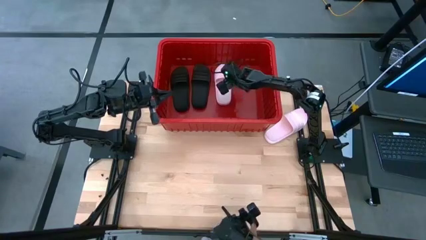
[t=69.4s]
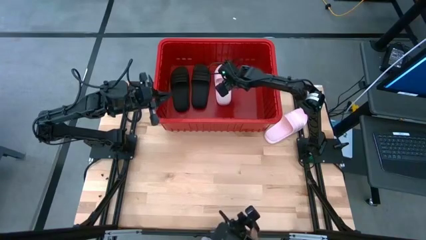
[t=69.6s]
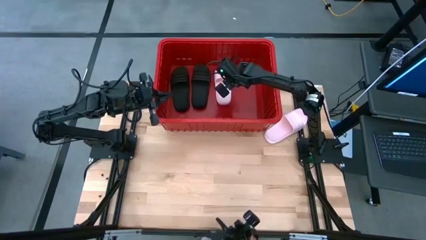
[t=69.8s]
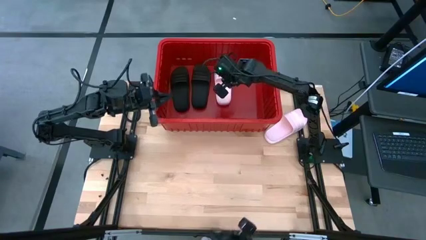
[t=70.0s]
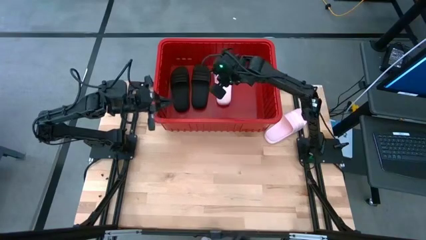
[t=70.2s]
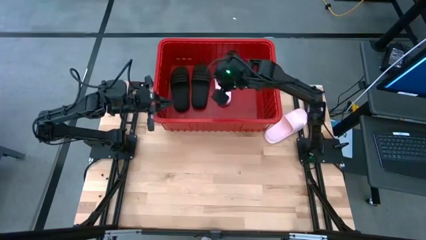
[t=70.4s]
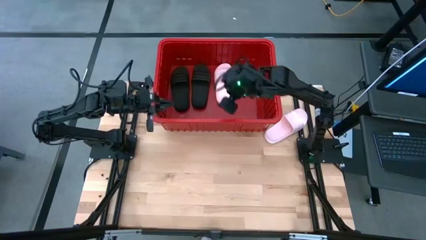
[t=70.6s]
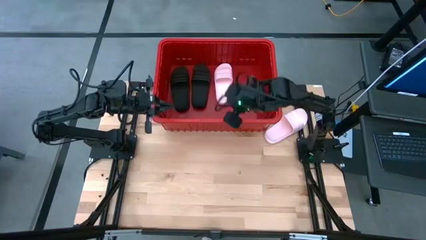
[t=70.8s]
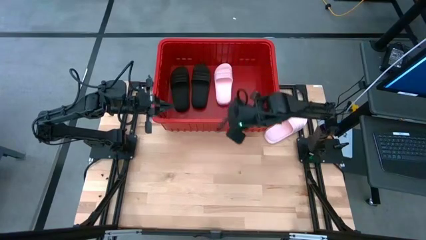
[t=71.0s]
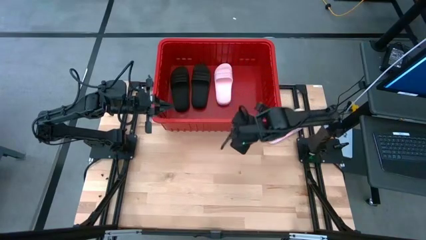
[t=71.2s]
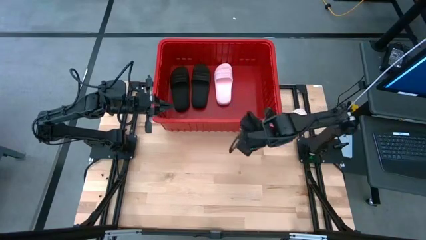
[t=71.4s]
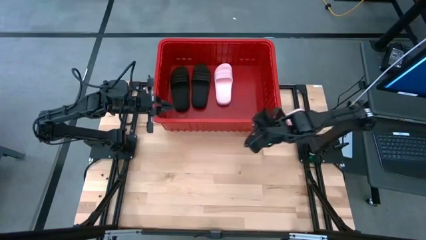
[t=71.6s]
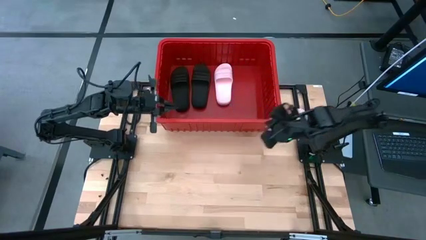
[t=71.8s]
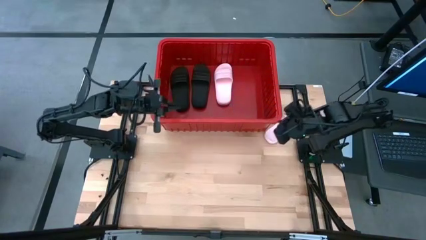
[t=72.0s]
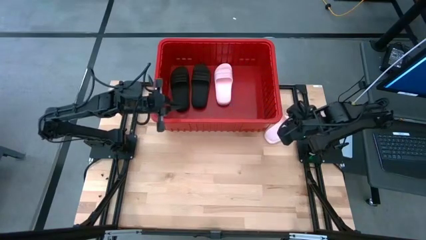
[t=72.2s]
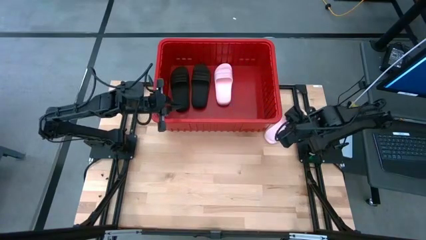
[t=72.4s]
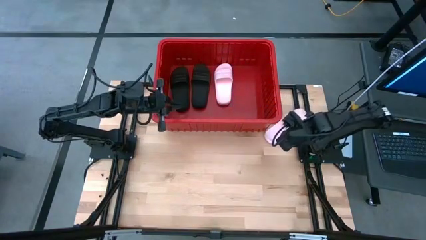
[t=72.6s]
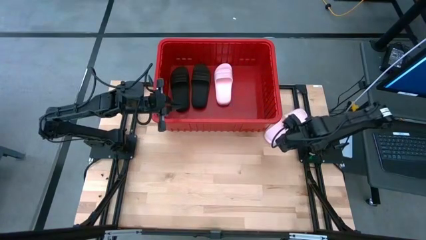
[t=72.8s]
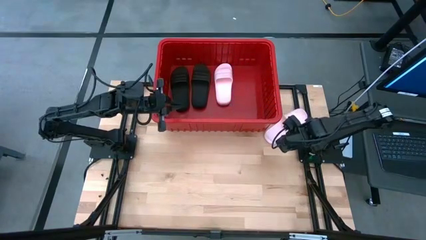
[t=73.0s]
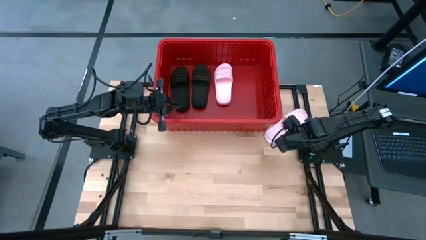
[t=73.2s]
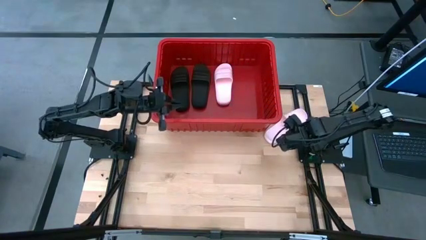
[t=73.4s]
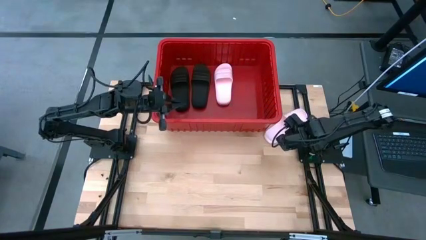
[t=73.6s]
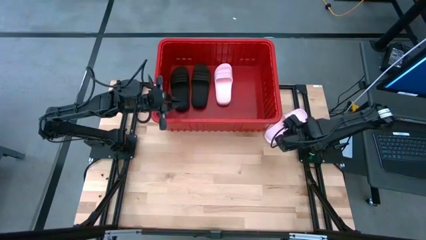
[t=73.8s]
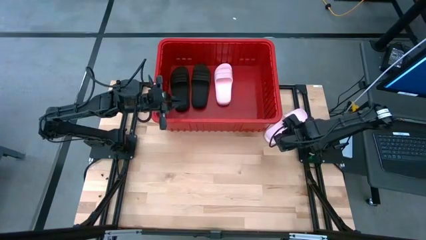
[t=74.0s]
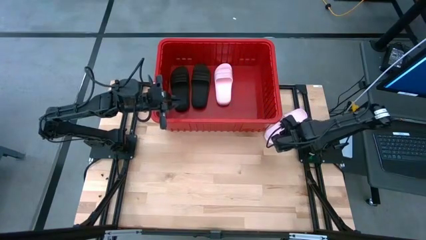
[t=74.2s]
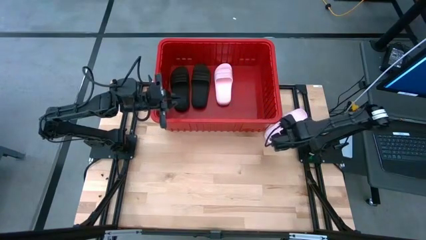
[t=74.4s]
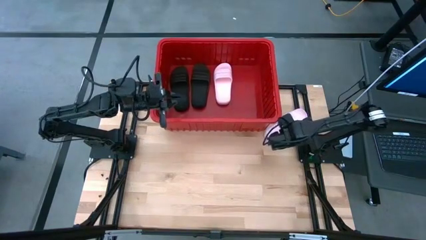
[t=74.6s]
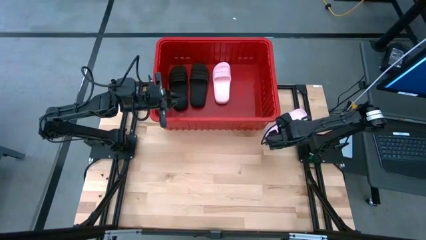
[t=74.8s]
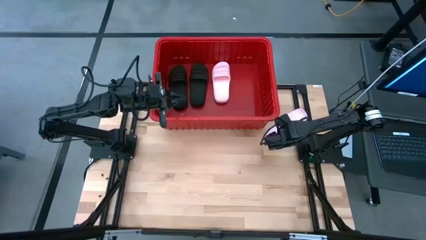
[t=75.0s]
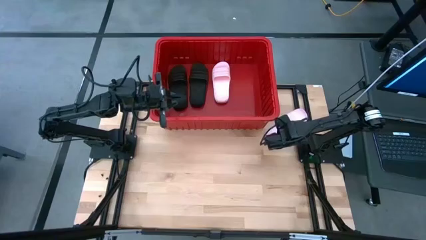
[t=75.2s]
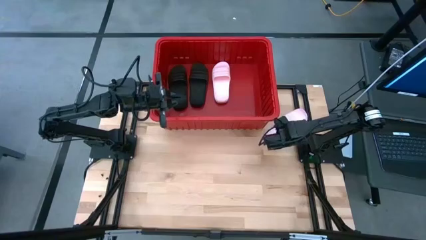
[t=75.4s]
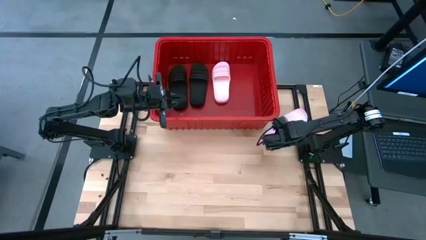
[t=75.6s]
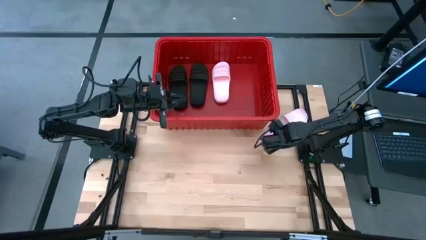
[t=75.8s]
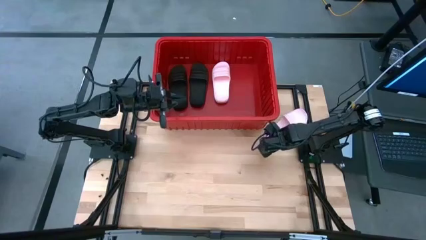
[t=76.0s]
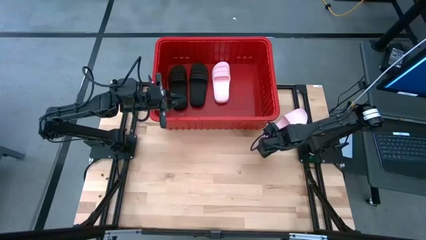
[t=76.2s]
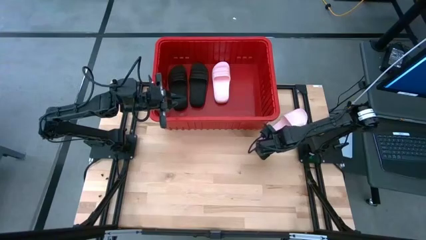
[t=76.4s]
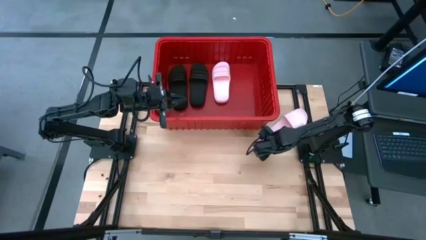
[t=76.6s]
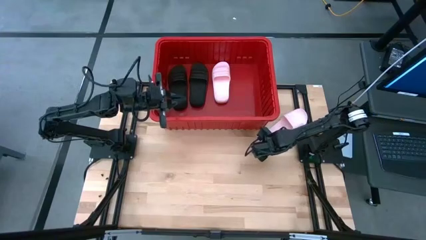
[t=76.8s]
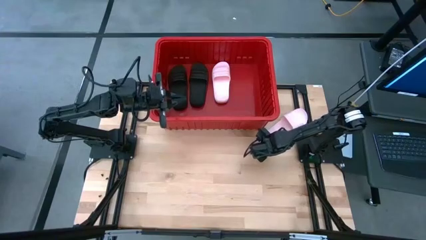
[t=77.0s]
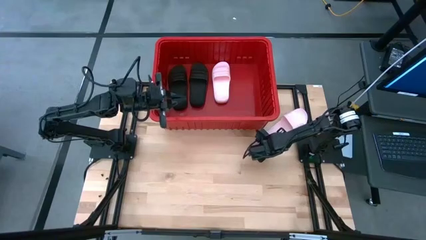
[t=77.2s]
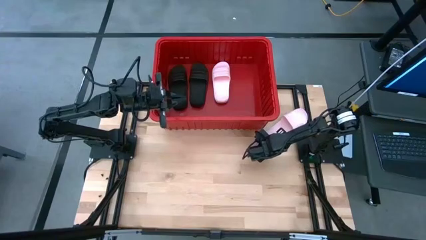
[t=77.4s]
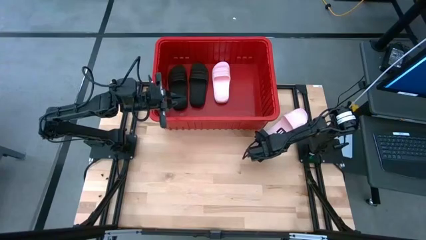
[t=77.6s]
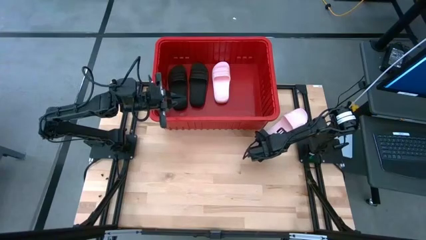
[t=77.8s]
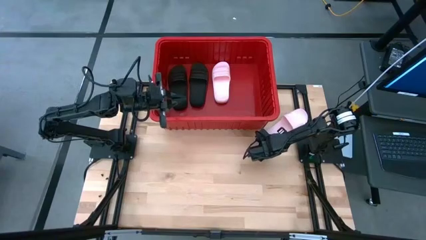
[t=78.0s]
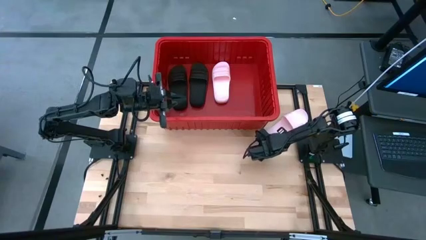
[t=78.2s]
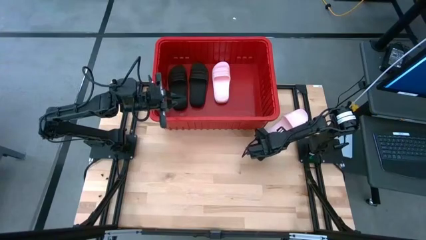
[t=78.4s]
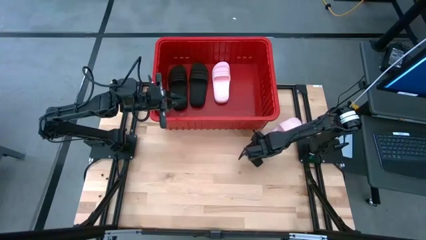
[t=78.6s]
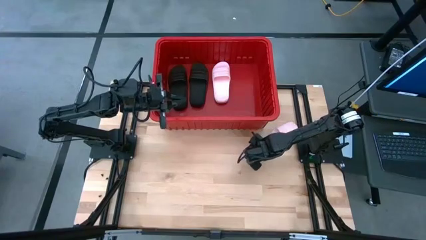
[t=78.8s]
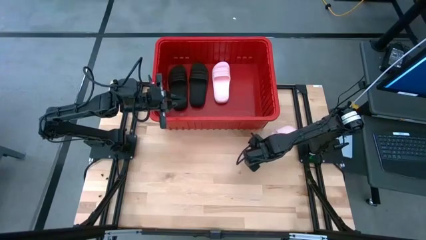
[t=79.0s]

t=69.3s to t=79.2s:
Task: Pick and place slides into bin
Put the pink slide into the red bin
